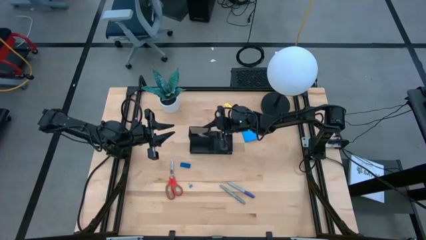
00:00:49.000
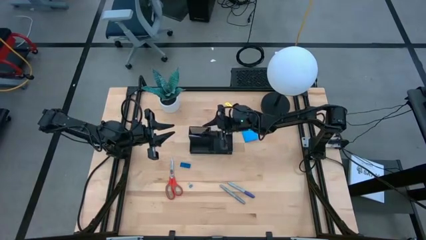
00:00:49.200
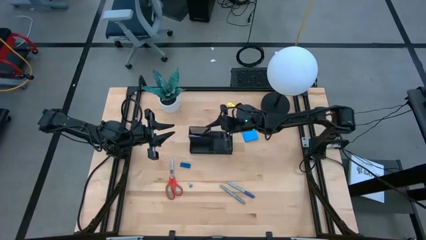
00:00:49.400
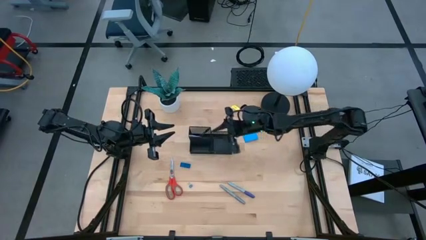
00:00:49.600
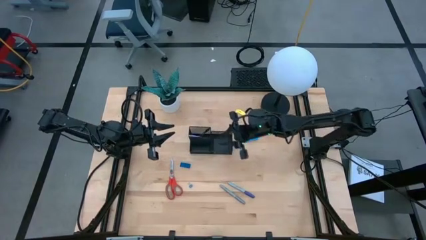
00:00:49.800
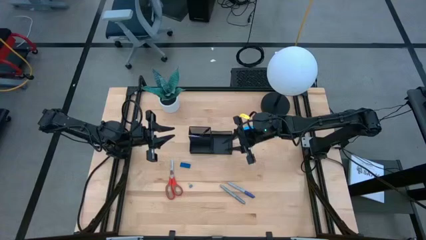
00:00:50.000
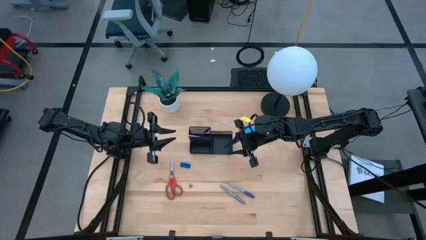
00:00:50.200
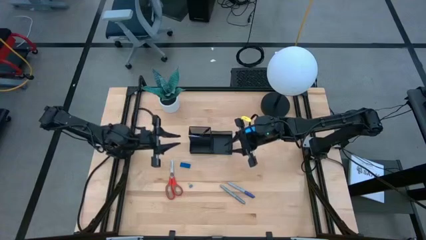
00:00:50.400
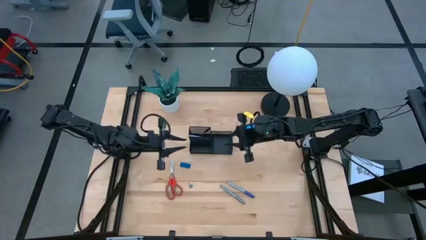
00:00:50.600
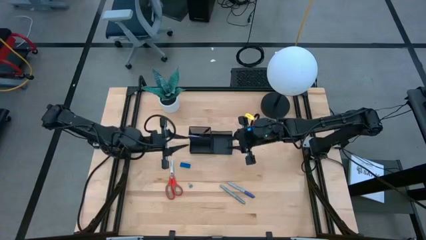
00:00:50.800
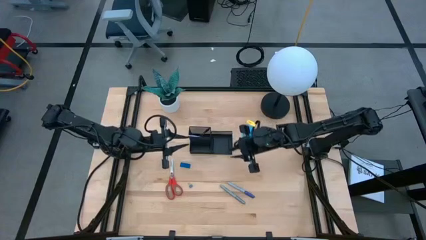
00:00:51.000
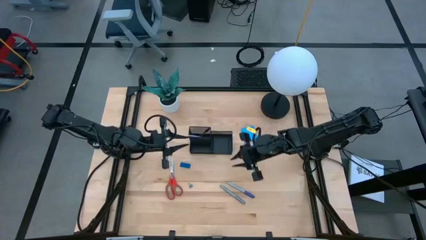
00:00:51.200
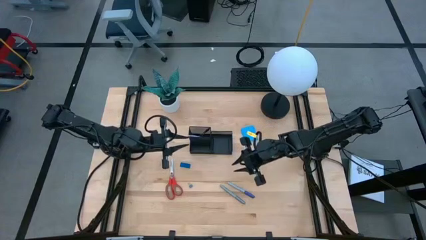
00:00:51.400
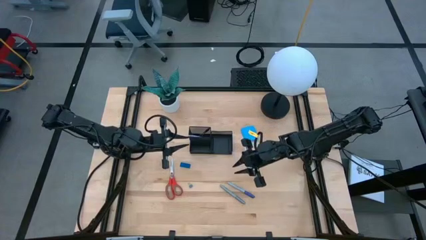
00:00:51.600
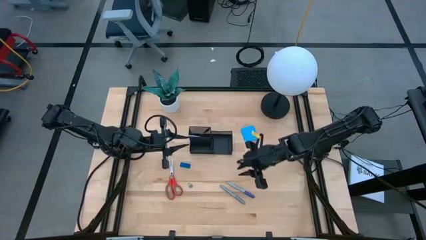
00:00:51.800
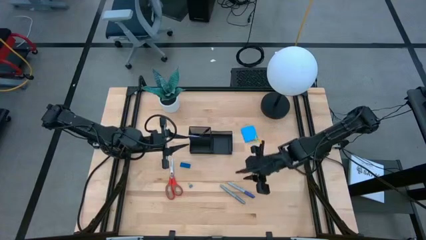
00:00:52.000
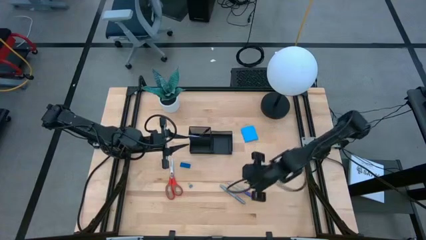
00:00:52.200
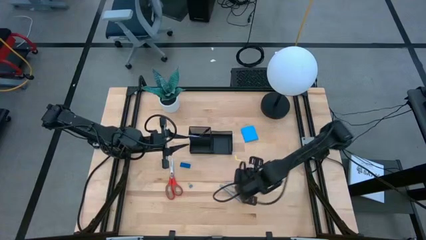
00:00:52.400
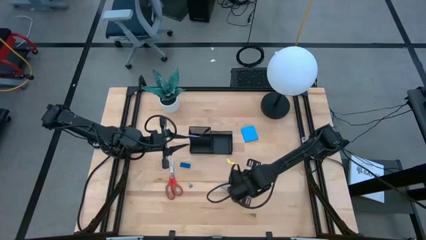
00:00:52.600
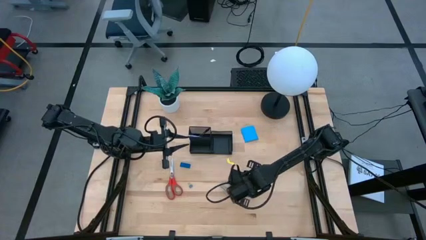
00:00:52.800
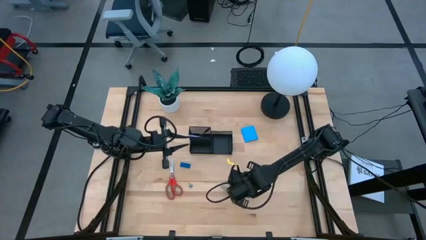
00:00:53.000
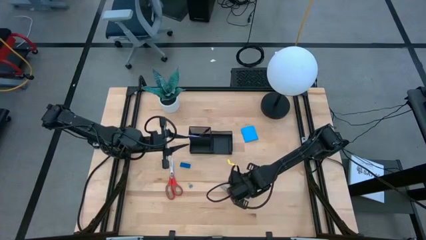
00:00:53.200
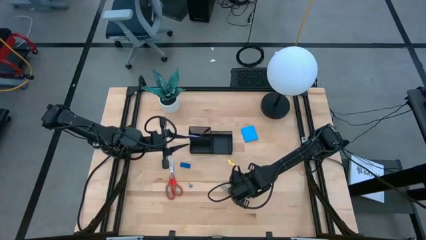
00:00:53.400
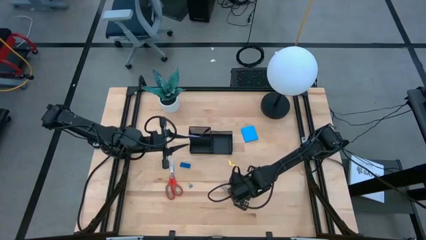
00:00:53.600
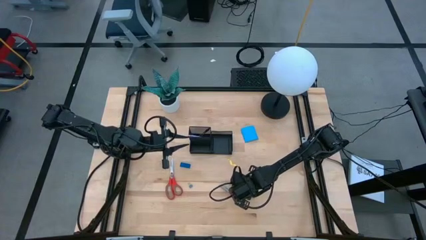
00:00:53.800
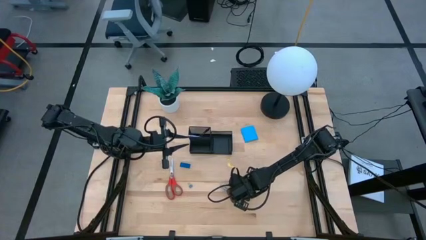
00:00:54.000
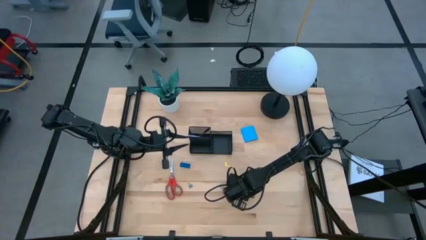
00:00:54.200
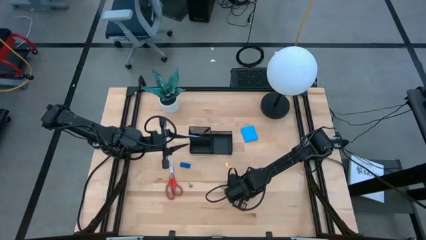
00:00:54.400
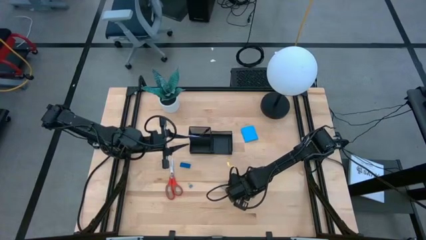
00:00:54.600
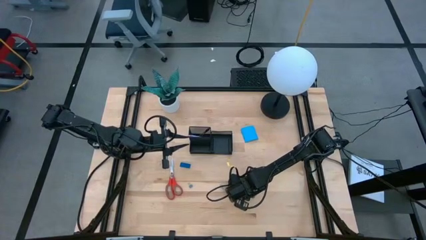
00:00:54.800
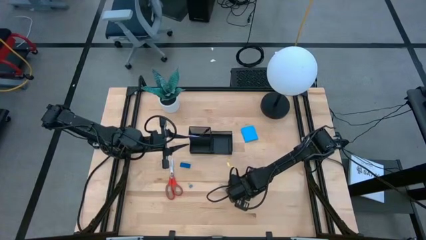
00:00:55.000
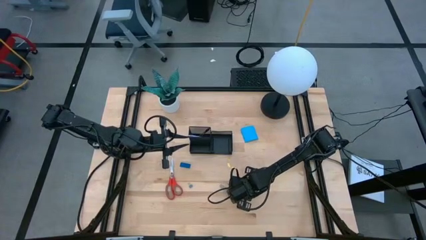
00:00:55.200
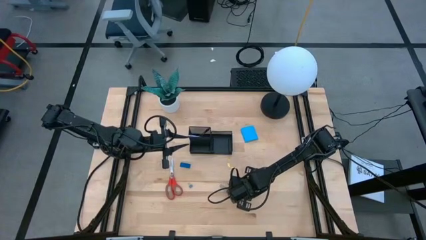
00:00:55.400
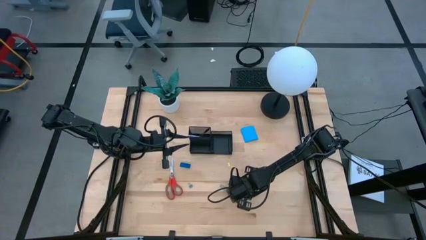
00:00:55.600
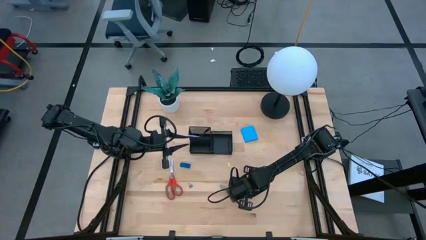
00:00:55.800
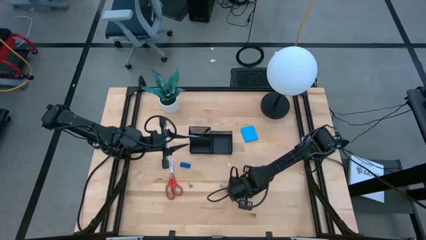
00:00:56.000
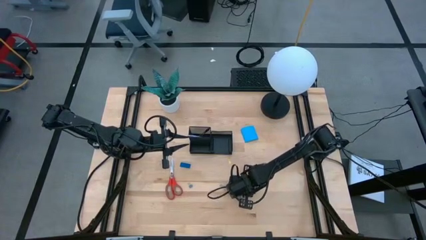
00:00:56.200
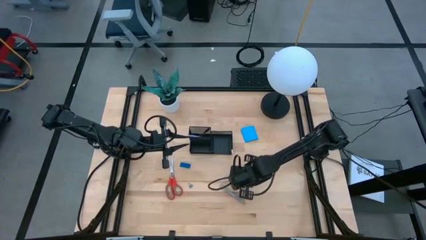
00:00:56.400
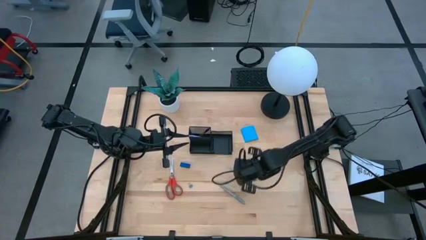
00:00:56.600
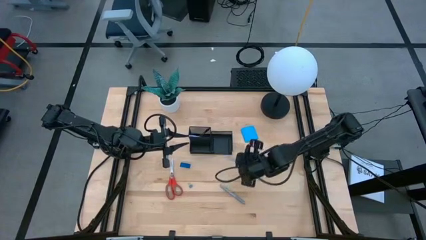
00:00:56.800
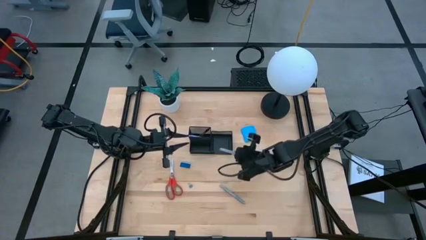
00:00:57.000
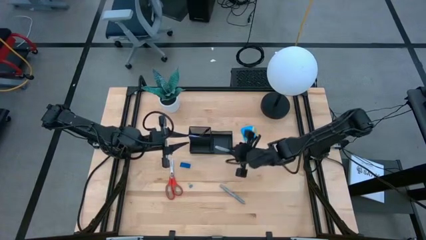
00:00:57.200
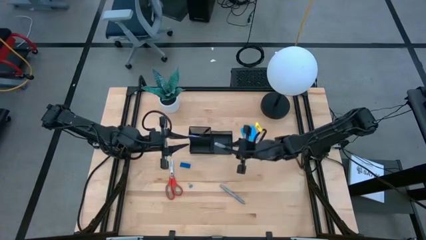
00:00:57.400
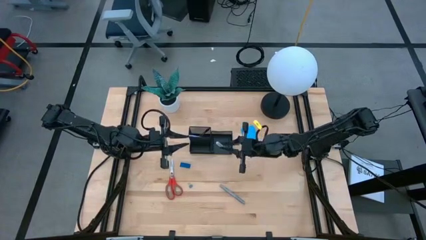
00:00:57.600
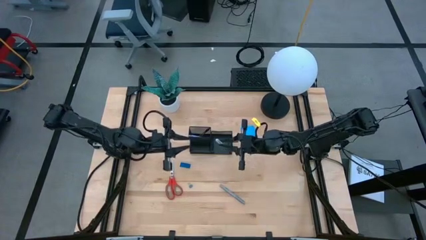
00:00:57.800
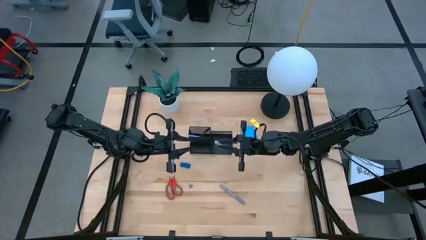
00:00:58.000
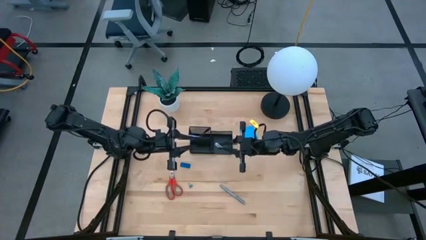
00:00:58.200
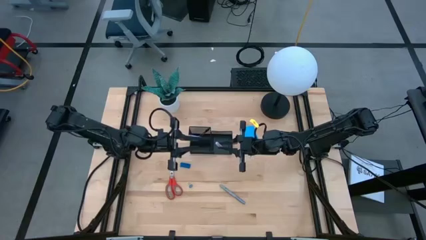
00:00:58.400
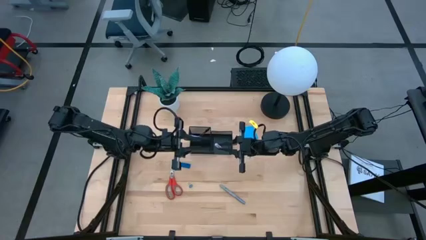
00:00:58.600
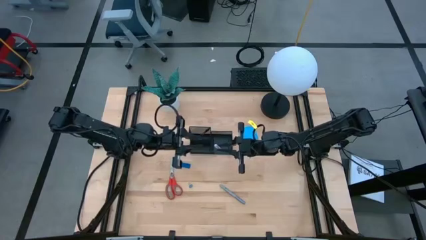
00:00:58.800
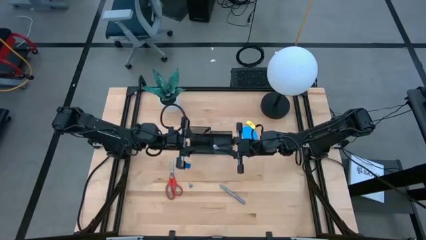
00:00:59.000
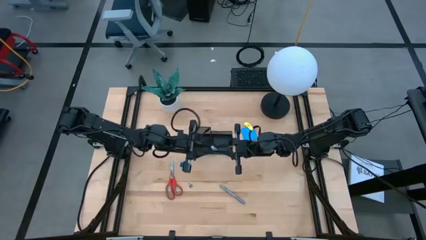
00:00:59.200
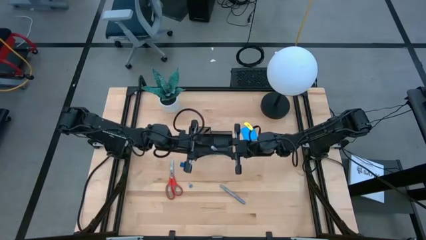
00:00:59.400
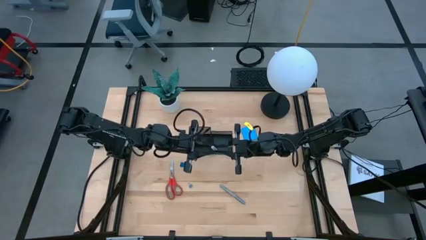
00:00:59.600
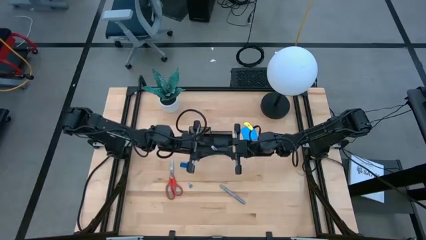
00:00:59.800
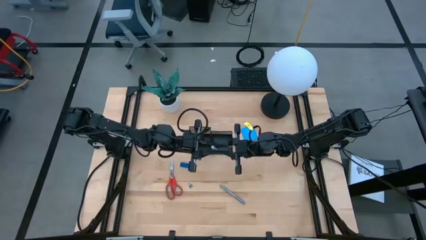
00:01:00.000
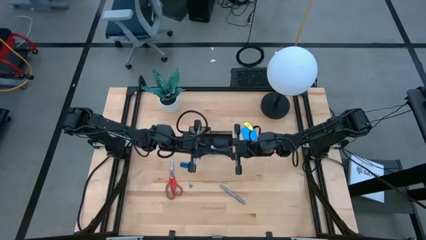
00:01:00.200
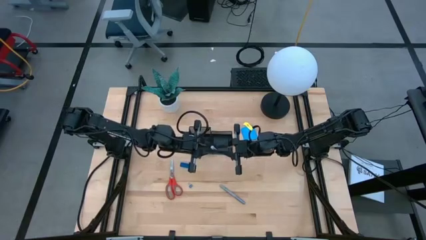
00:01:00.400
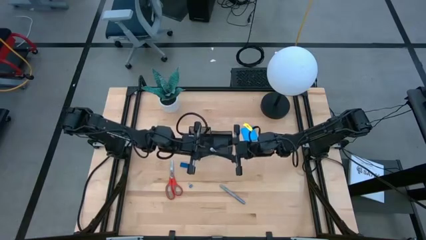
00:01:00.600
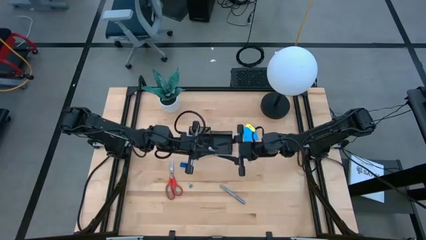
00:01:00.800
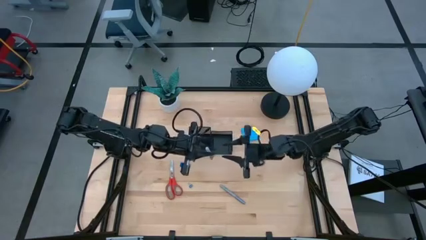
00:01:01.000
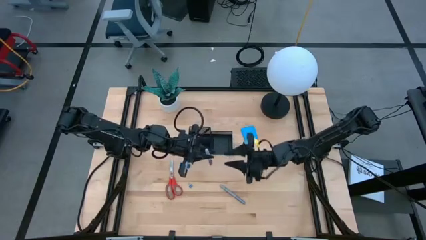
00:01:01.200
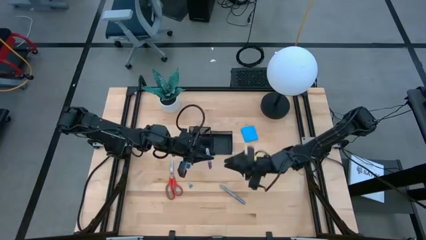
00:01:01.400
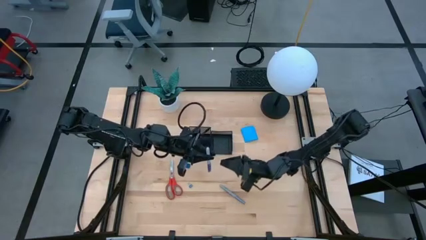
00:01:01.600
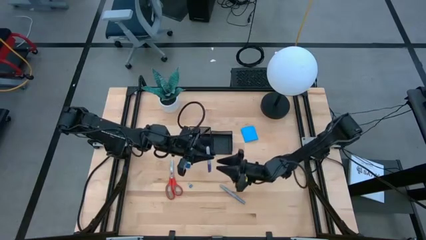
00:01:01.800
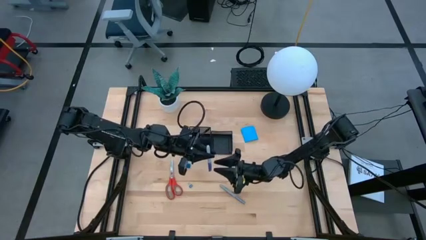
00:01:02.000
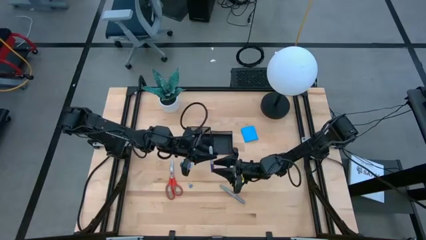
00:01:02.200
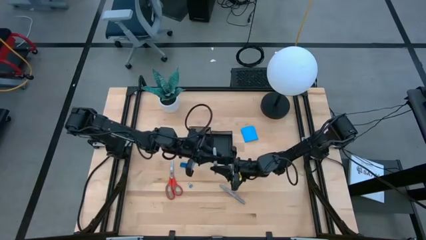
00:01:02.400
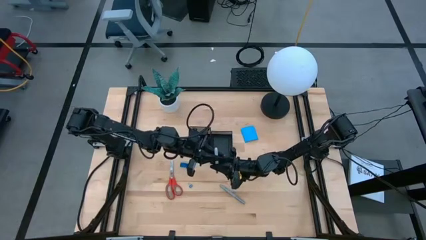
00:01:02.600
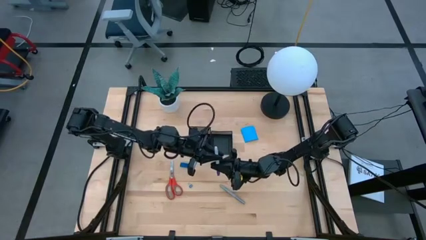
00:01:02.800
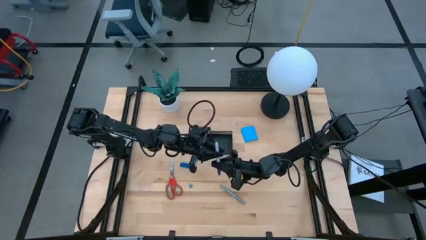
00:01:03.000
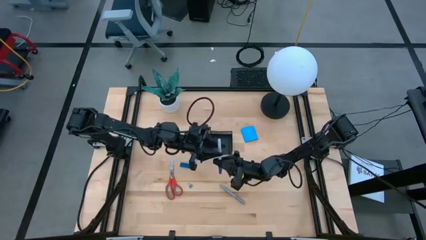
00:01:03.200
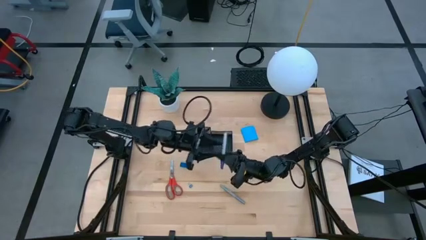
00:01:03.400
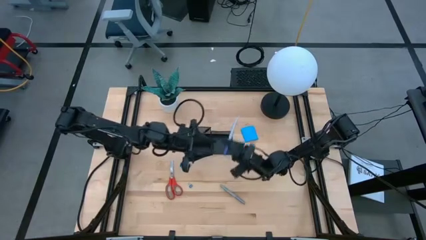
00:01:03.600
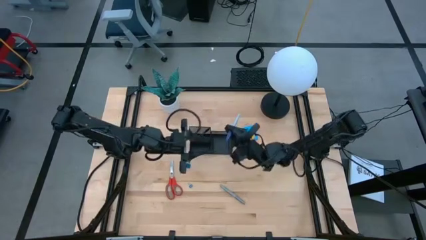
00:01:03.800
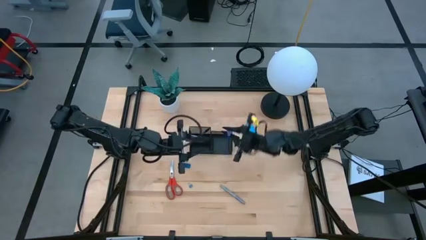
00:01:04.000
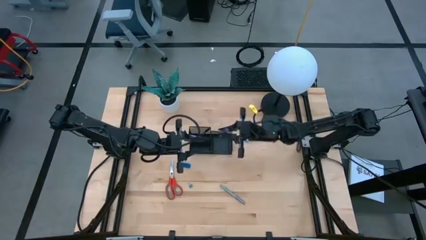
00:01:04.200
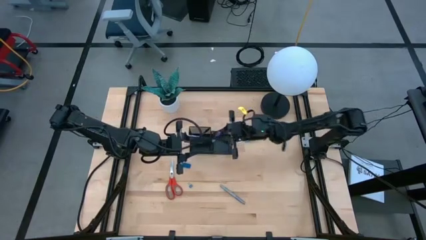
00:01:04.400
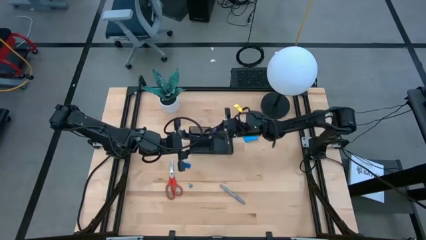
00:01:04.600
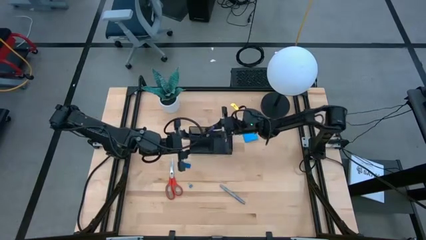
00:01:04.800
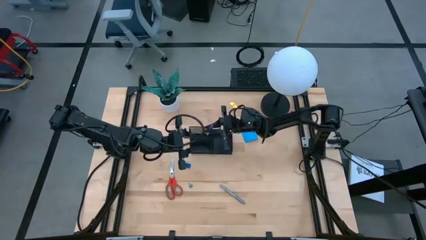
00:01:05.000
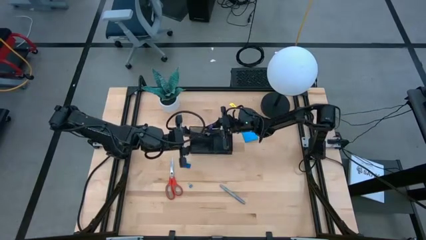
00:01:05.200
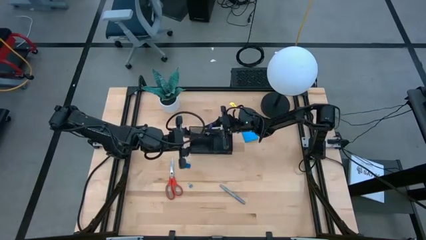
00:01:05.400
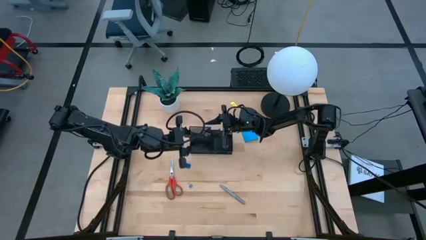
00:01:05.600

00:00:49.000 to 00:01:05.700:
Task: Pick and place office supplies into organizer
Put the blue marker into the black desk organizer
